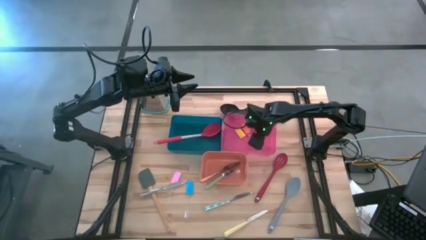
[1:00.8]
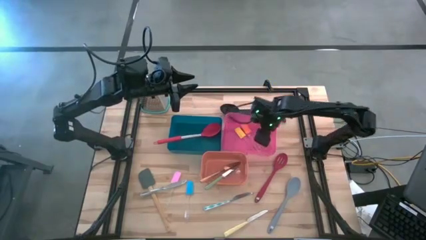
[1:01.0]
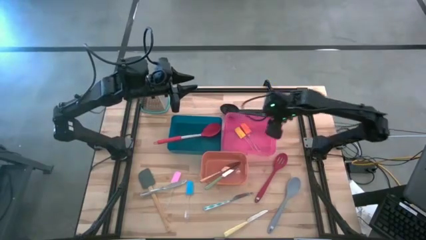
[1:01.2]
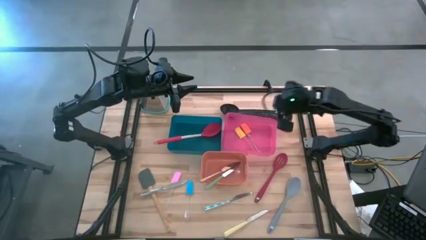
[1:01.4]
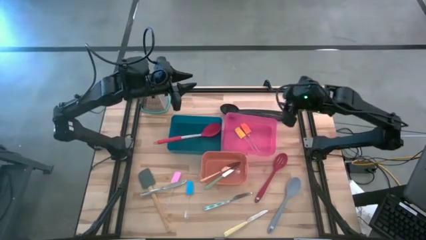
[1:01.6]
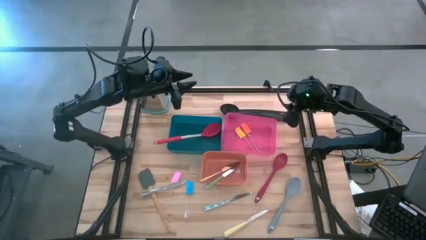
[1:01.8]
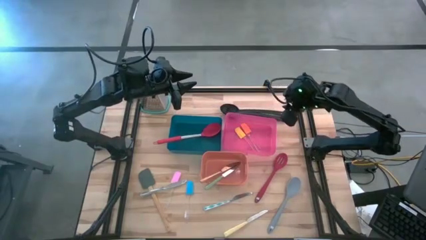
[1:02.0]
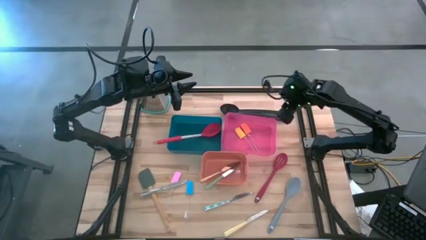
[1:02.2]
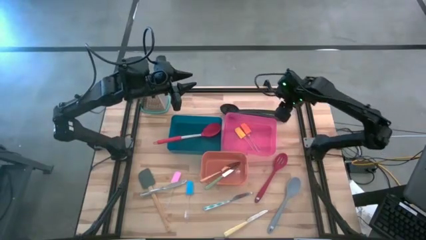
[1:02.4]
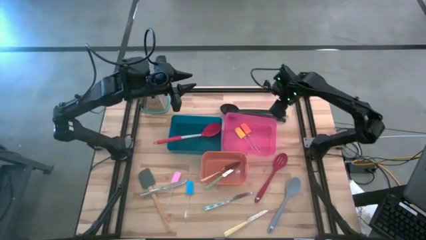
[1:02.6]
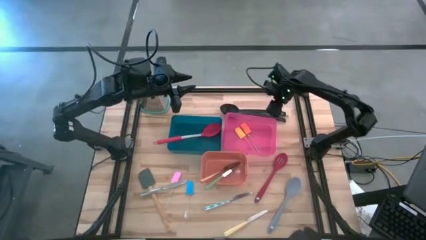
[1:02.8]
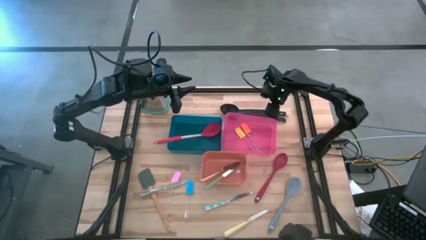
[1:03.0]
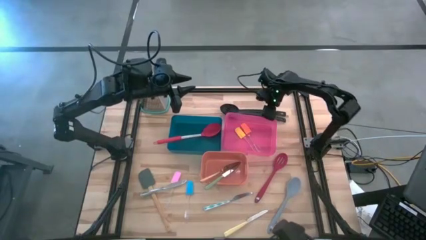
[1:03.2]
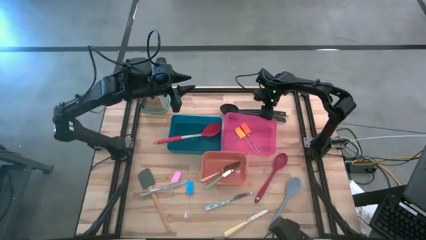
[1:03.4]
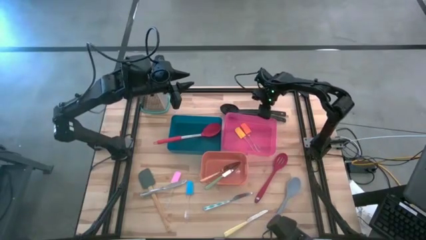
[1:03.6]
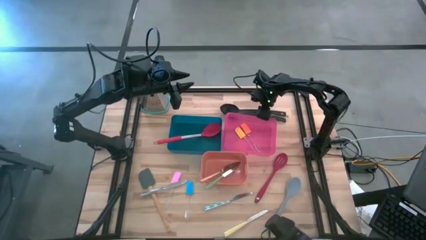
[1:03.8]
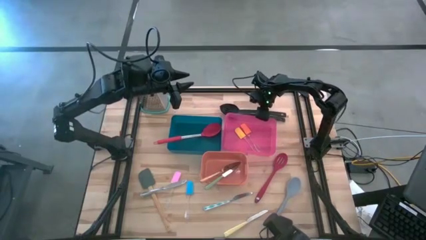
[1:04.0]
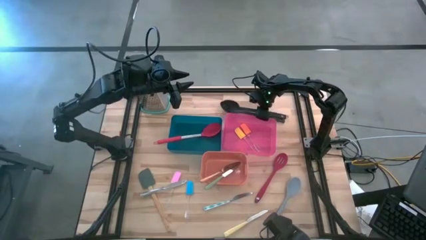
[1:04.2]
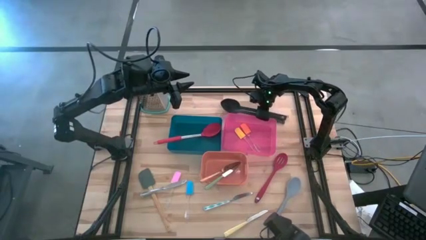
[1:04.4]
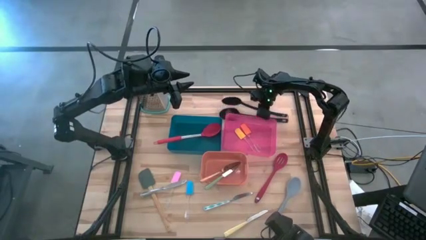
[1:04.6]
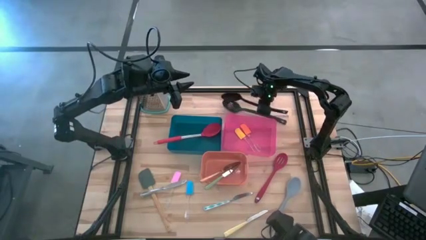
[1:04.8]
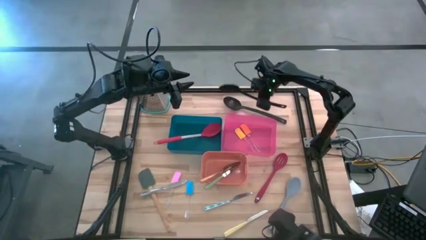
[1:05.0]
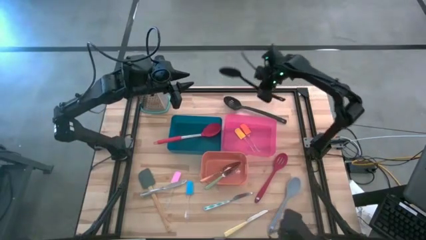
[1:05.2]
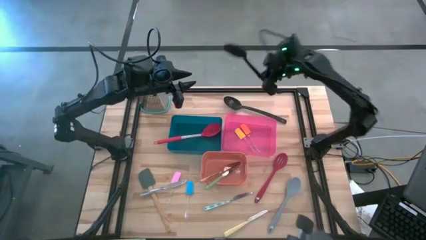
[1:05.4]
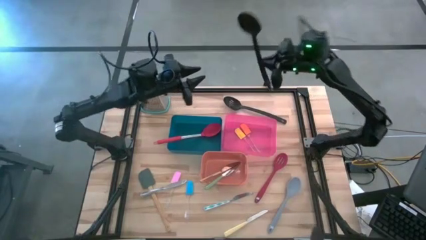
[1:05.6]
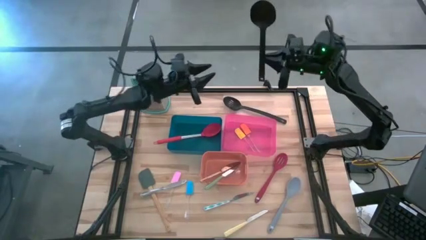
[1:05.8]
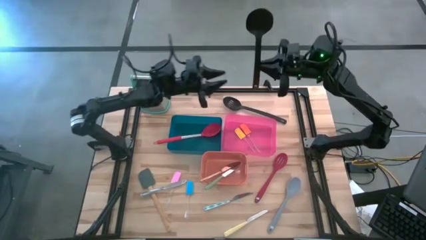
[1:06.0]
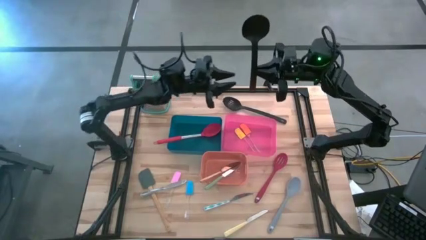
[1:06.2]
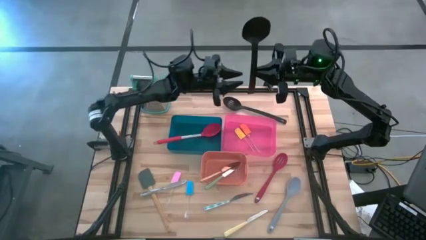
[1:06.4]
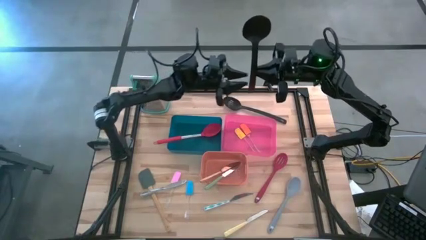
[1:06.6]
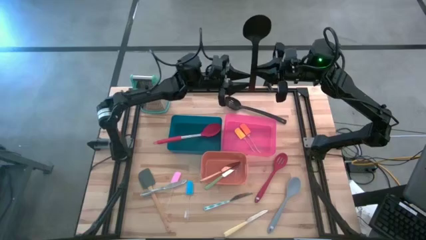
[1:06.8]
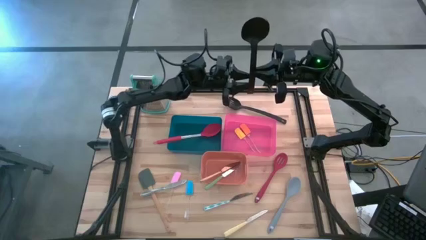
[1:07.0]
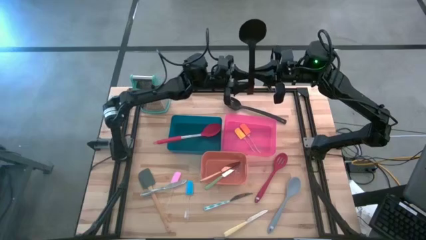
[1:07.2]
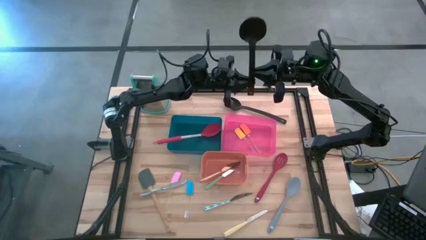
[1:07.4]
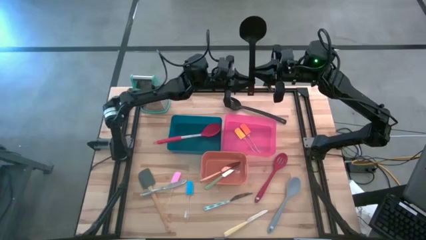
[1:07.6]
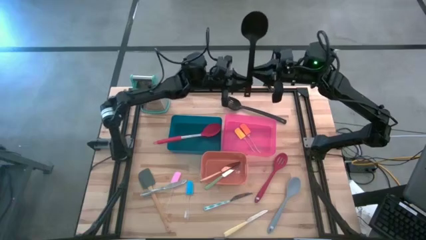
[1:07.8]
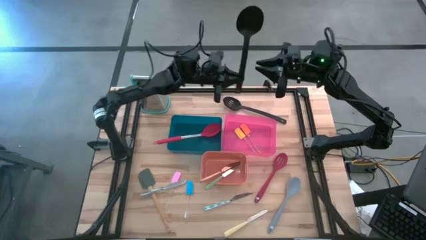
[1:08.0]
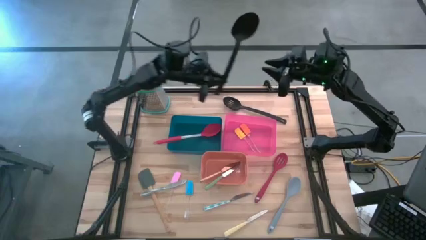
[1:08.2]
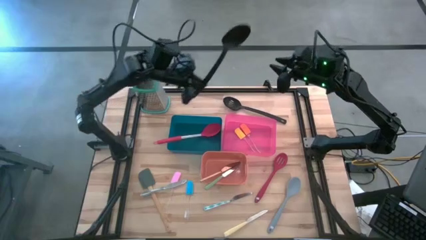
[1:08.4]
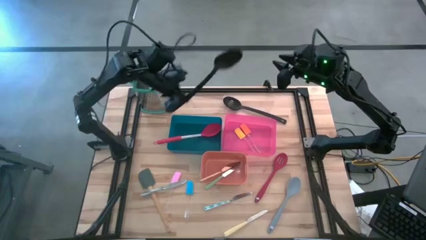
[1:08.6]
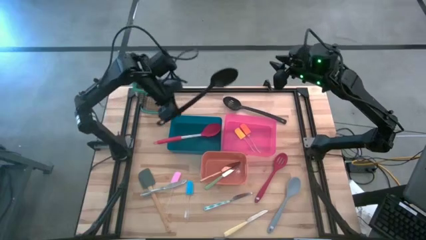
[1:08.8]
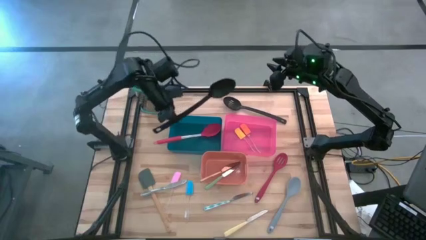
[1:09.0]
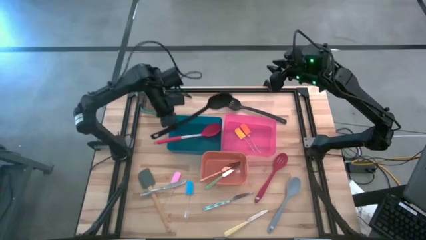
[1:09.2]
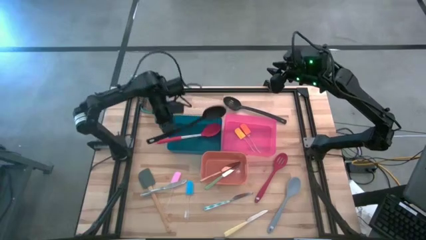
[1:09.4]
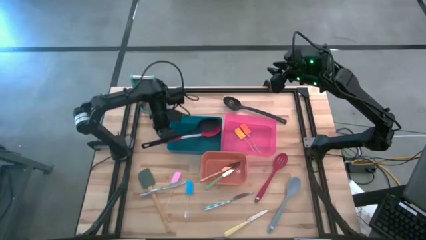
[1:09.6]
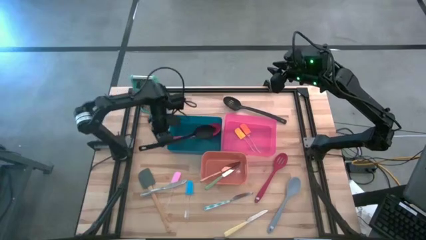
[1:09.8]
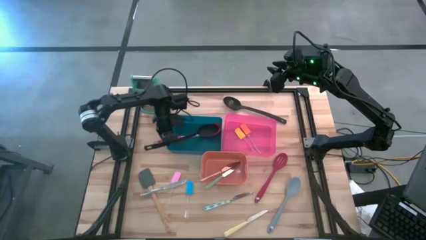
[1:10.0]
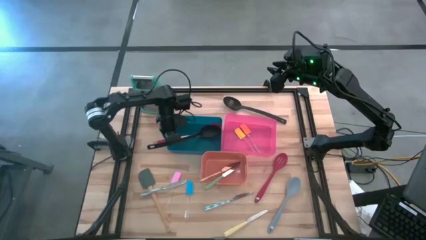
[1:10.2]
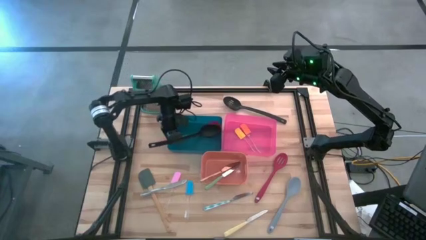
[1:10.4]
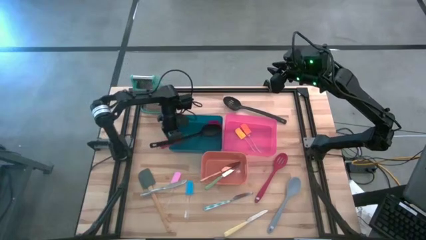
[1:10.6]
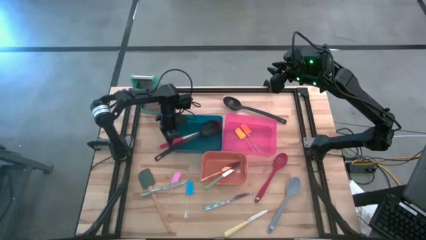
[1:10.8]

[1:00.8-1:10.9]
Task: Pick & Place Kitchen Items
Put the black serving spoon into the blue bin

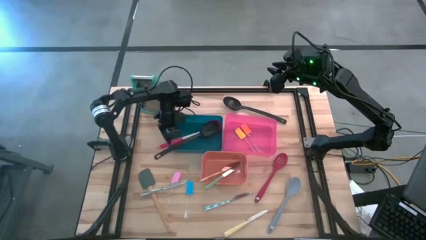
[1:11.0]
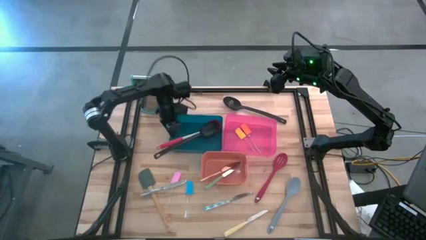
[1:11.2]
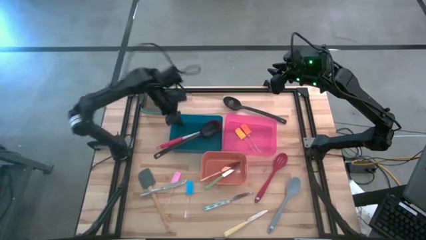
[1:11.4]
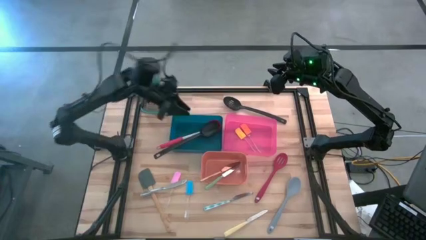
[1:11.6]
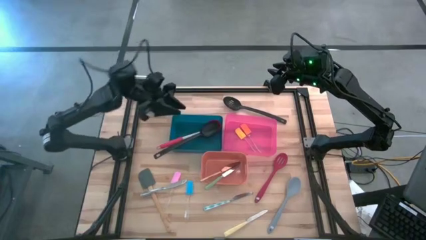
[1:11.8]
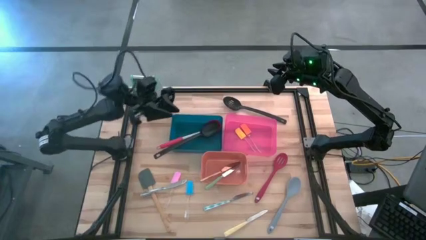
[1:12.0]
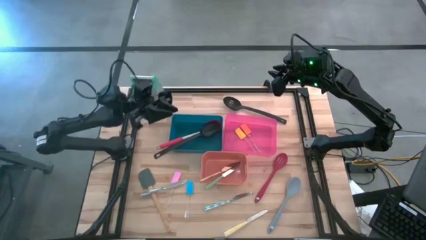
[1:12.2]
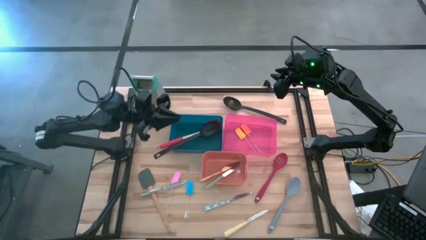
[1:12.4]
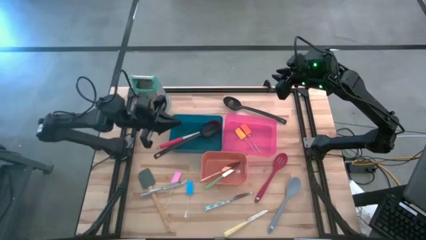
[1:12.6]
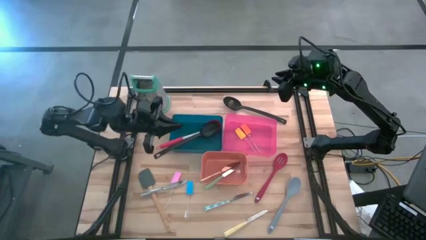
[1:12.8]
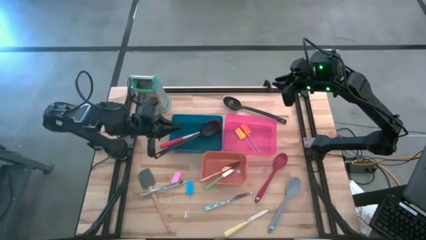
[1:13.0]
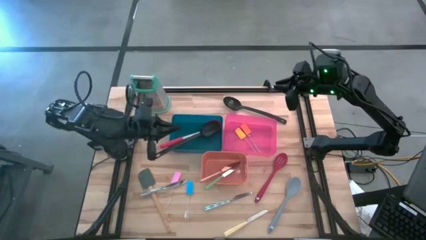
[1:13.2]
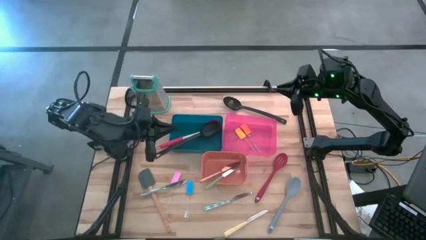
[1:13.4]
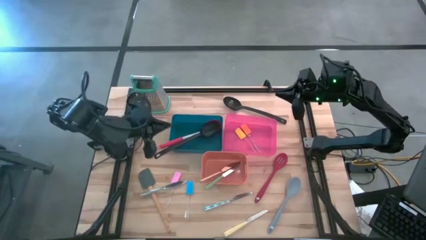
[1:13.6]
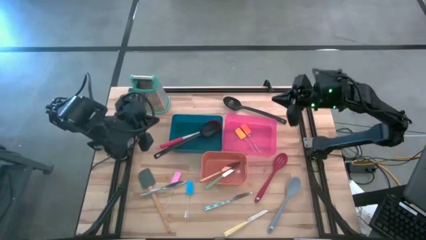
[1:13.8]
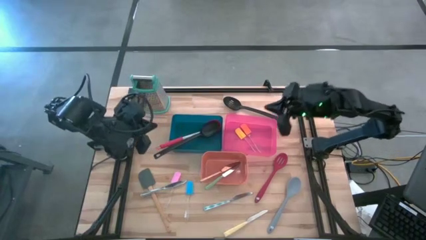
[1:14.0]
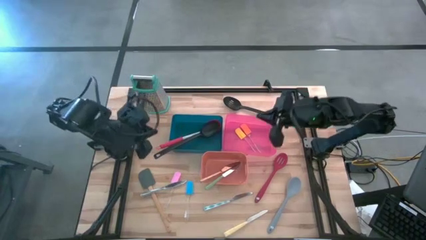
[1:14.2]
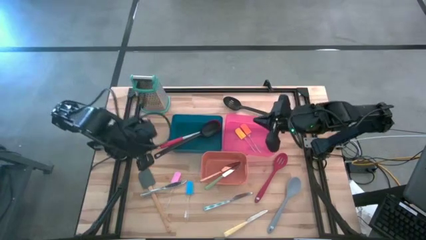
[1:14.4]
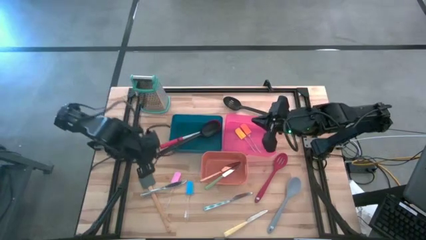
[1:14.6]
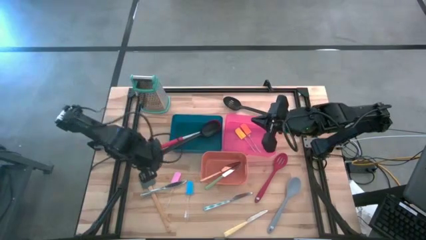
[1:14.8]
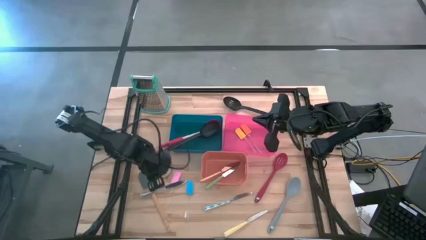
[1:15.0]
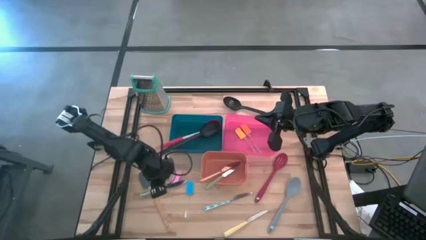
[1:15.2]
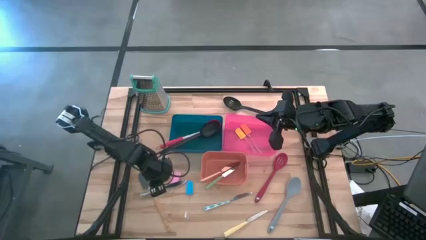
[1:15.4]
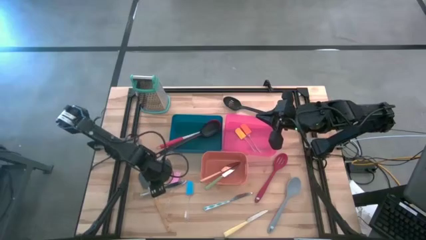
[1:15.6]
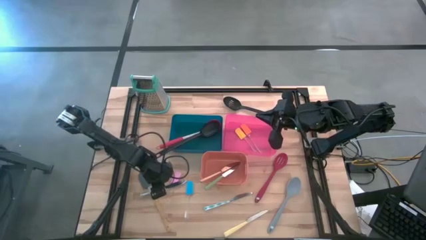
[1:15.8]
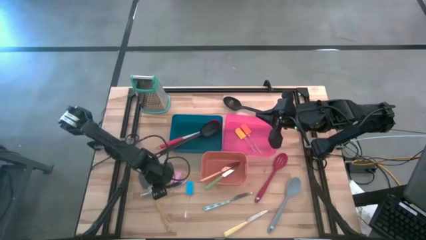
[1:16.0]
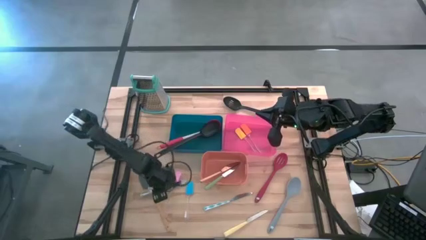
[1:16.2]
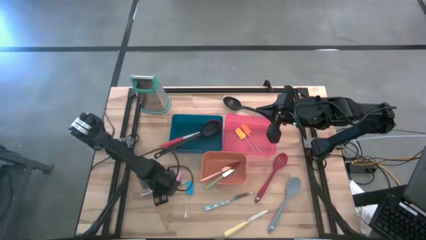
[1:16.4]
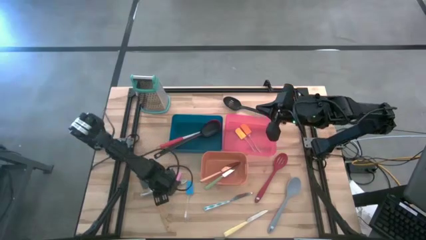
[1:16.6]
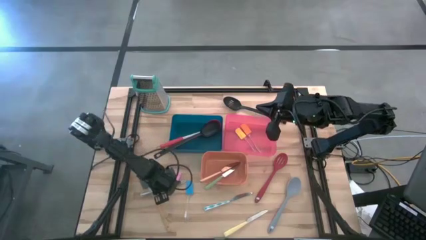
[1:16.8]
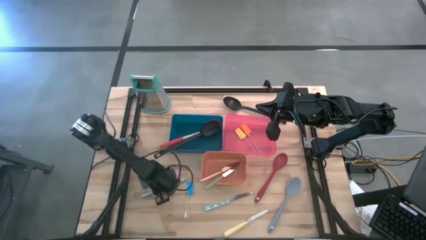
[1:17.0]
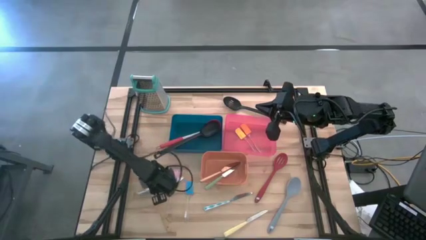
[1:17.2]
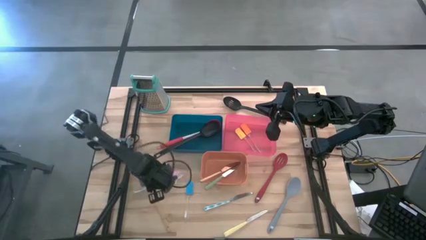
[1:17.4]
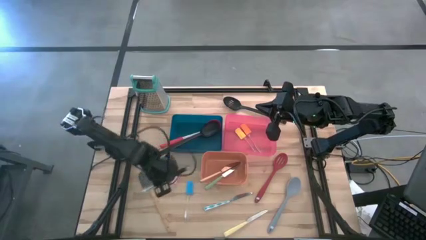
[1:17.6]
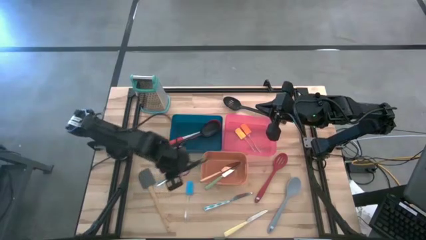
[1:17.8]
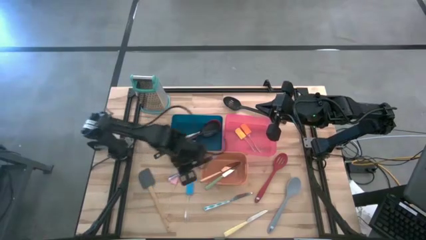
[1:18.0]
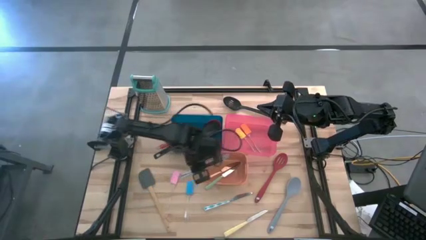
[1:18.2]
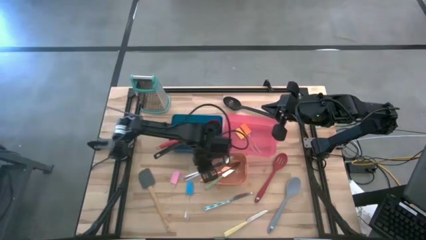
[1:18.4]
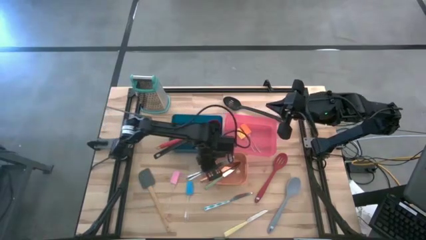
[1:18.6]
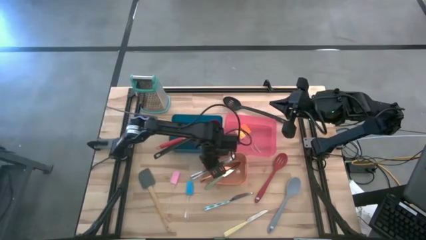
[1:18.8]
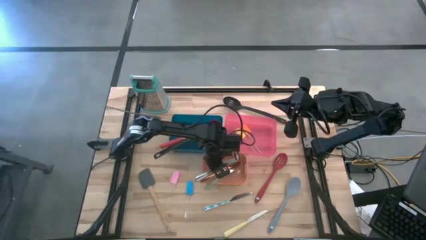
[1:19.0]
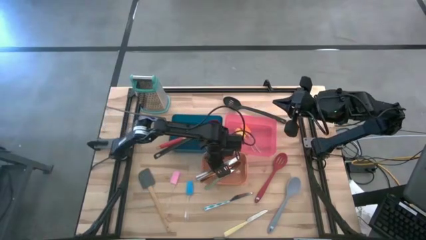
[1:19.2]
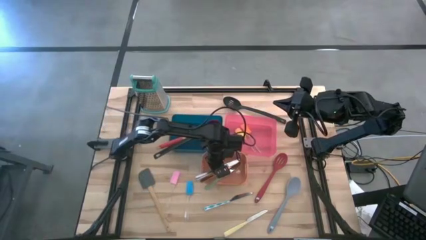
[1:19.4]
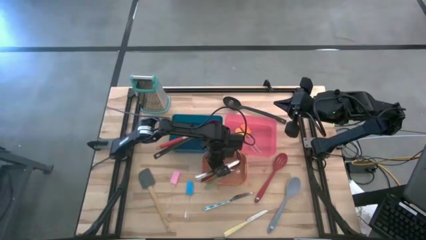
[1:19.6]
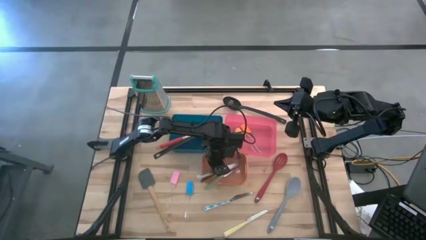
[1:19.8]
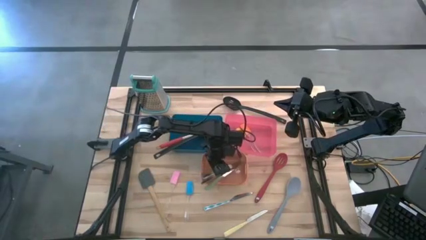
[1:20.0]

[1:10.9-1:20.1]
Put the silver knife into the orange bin
